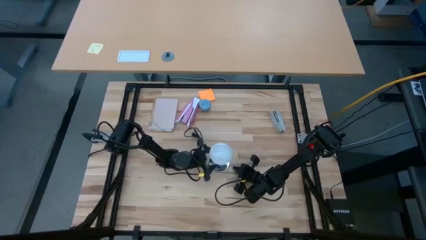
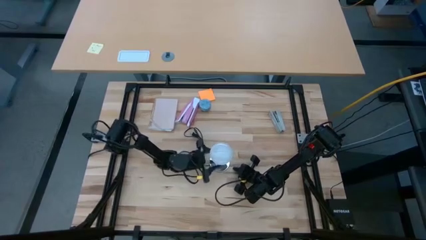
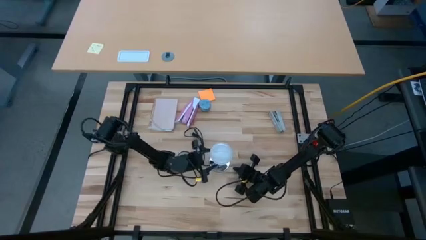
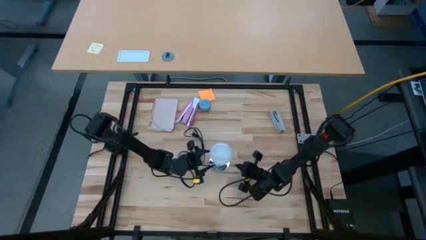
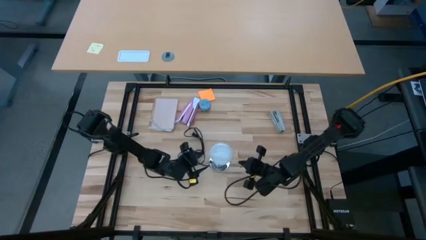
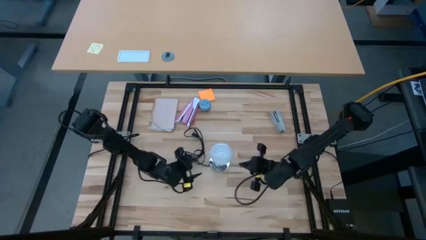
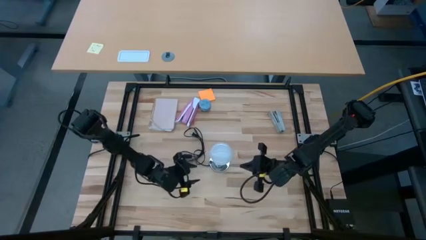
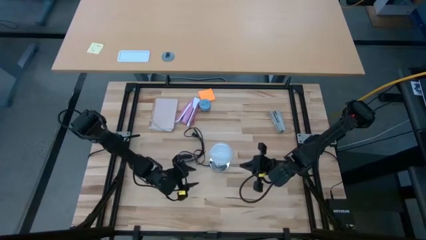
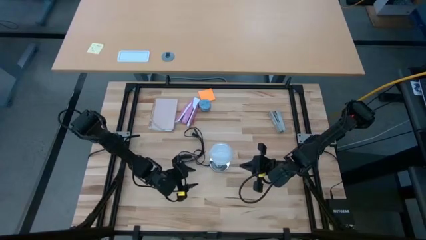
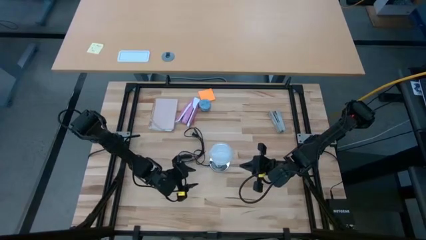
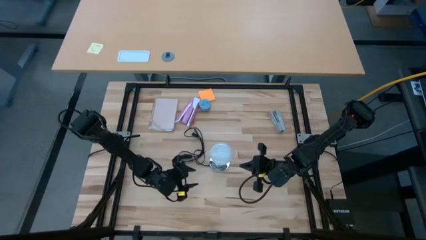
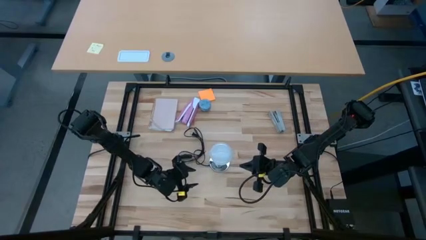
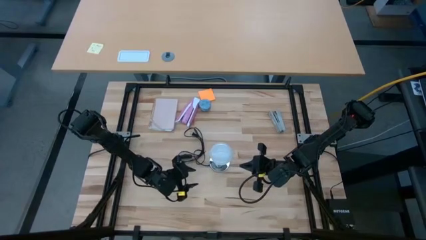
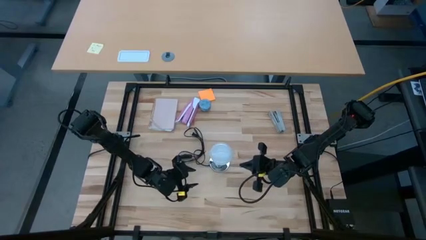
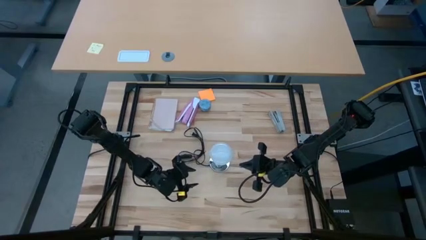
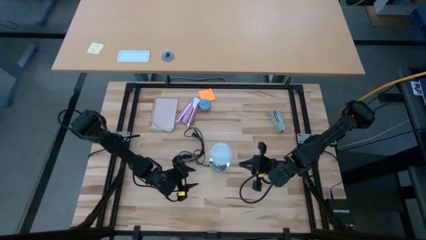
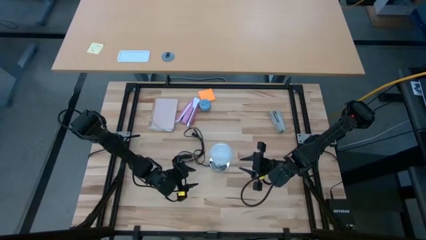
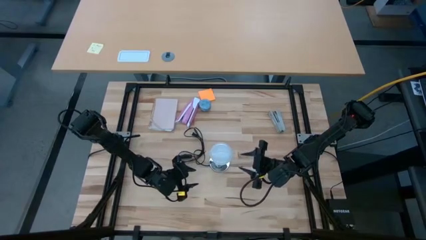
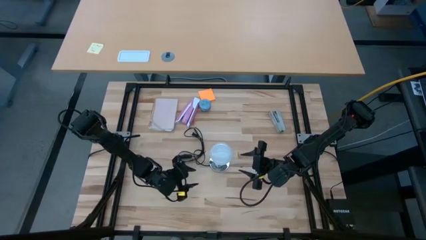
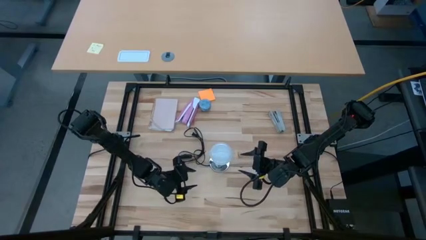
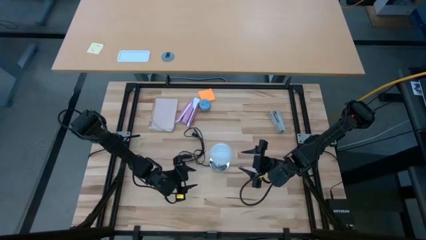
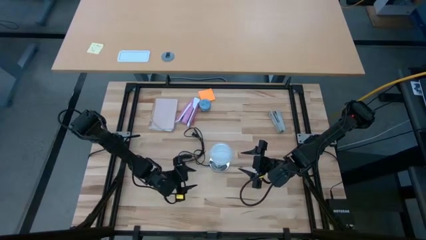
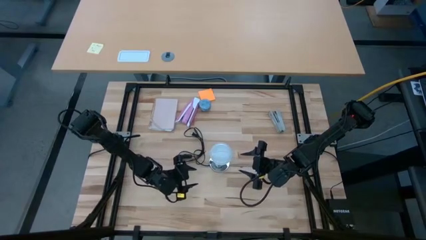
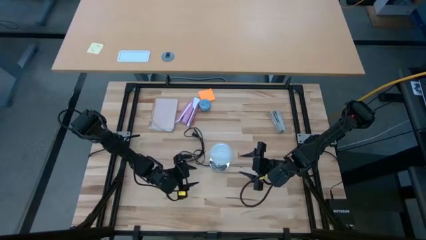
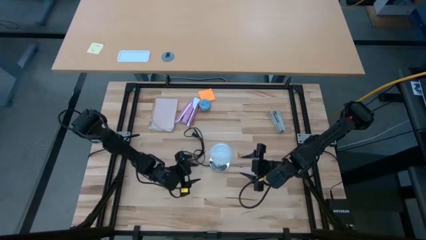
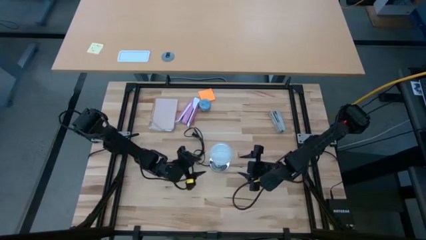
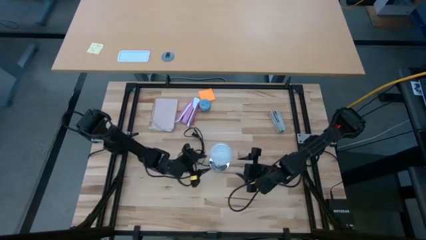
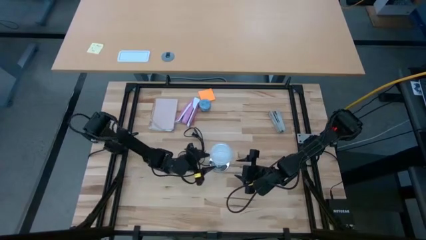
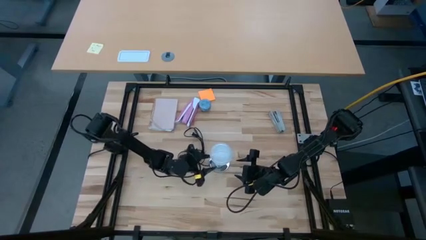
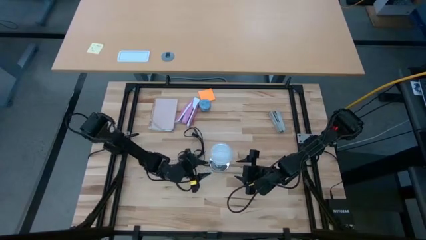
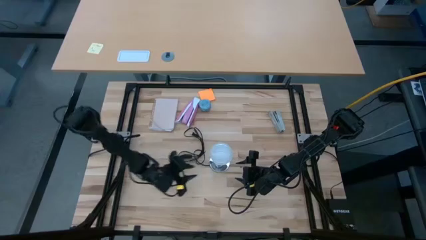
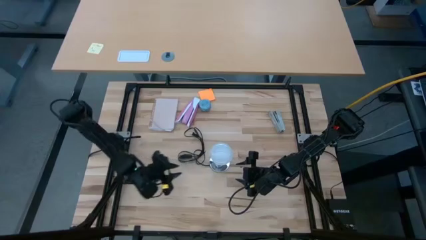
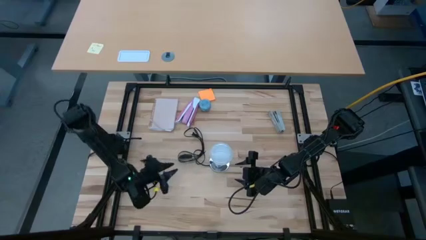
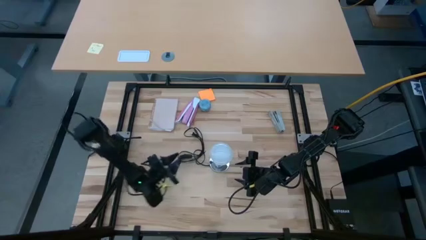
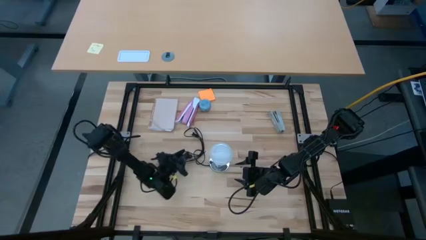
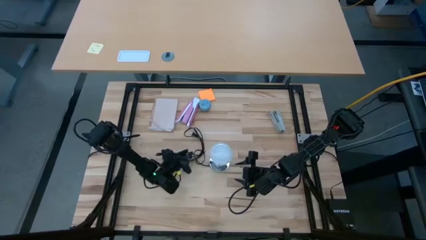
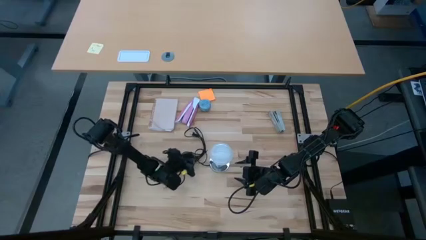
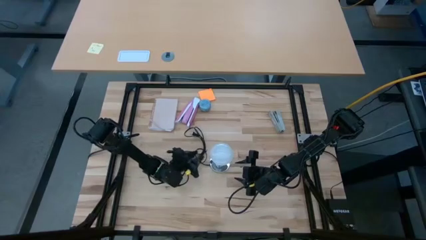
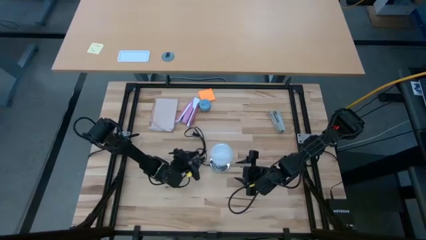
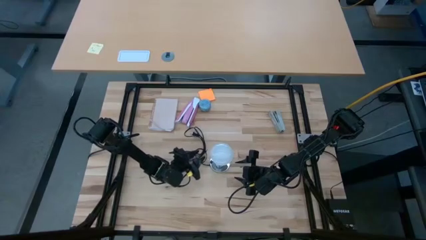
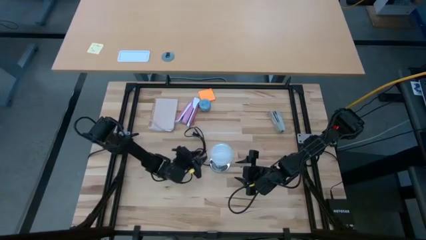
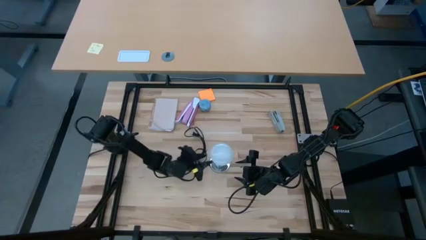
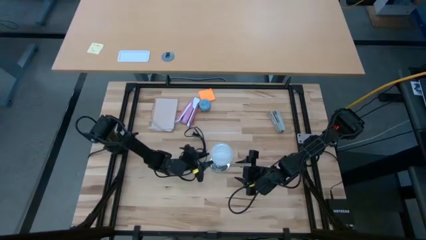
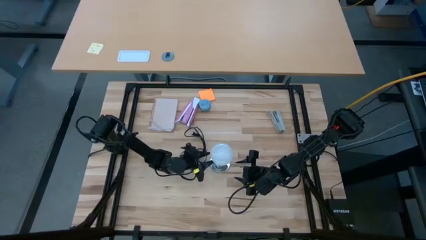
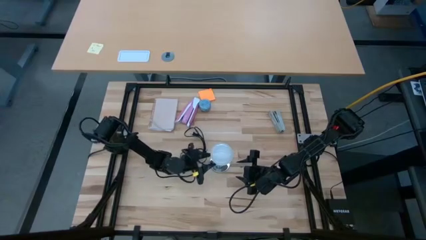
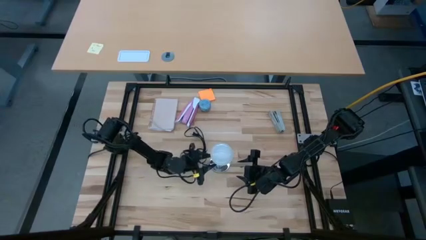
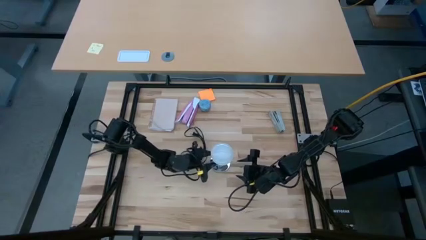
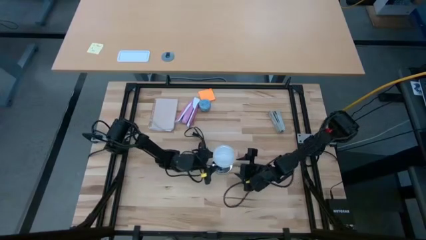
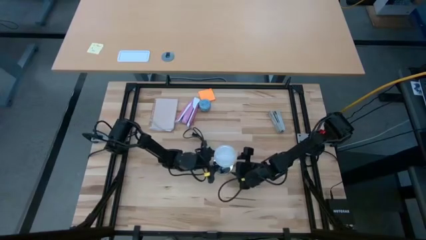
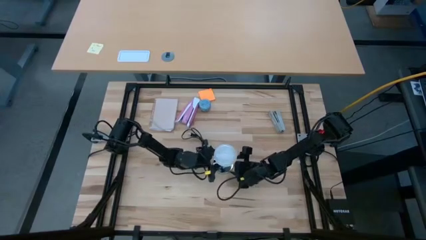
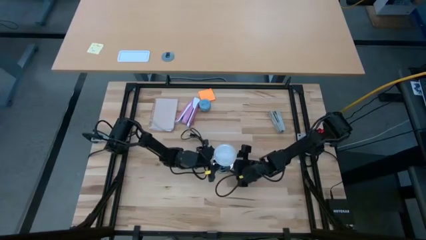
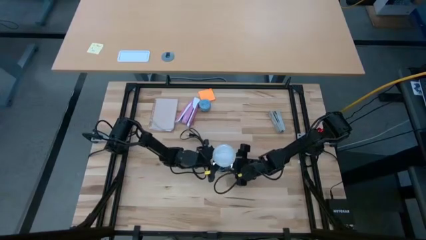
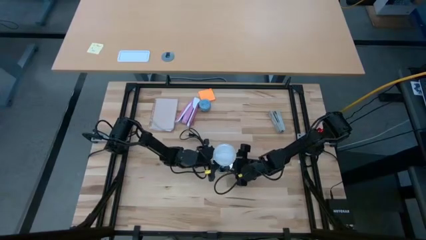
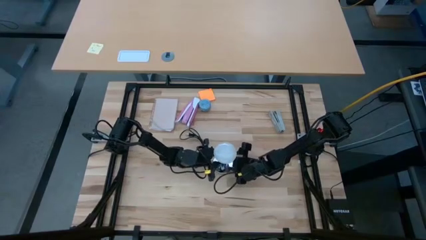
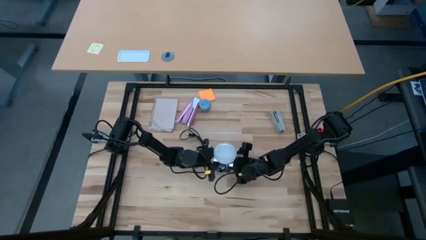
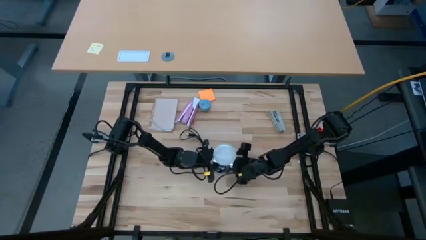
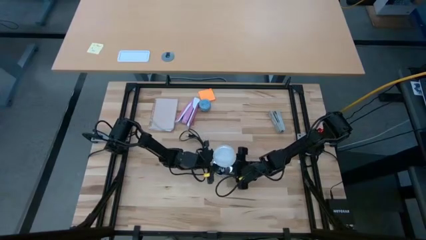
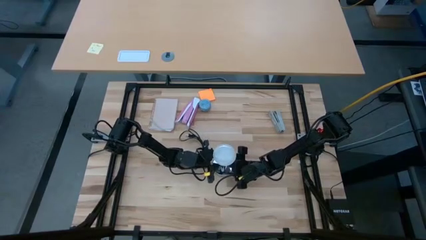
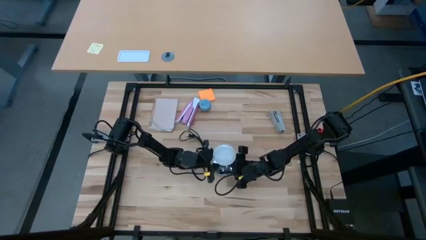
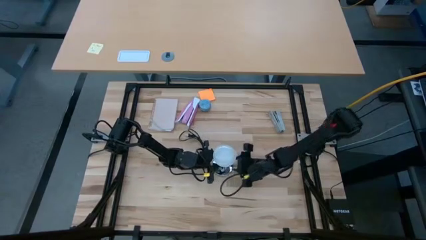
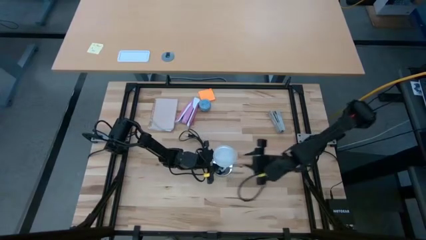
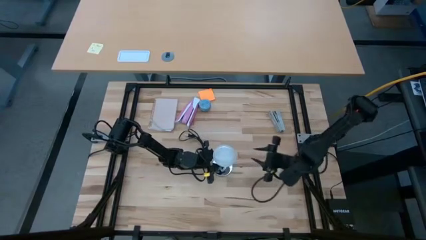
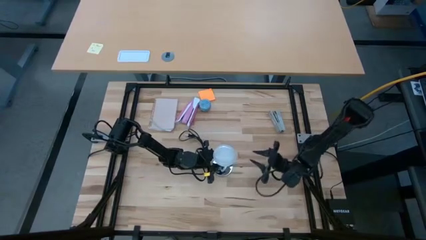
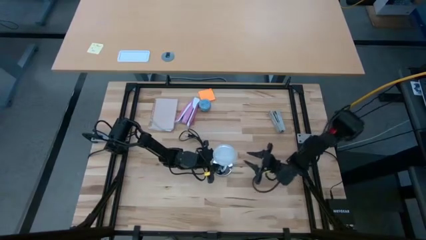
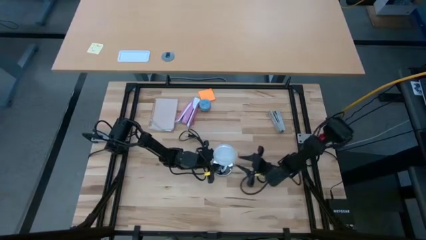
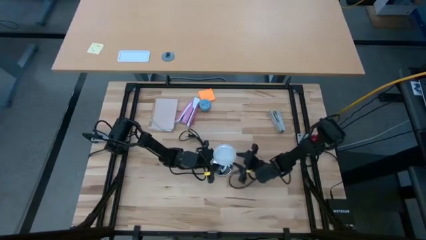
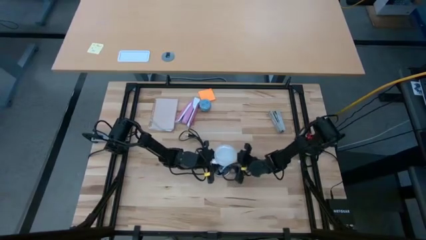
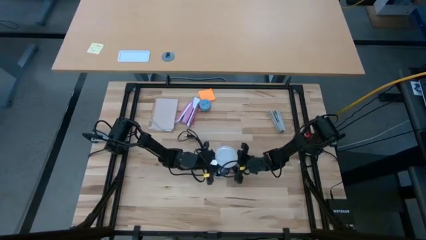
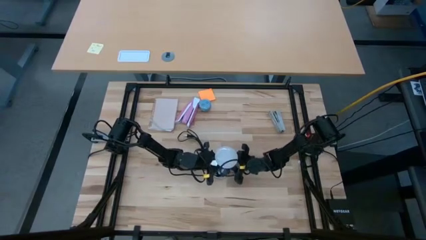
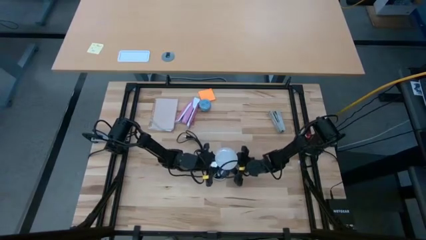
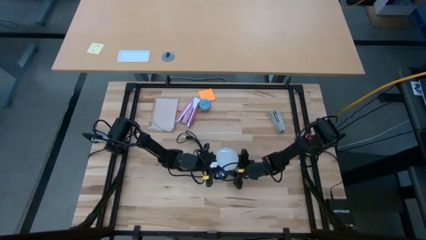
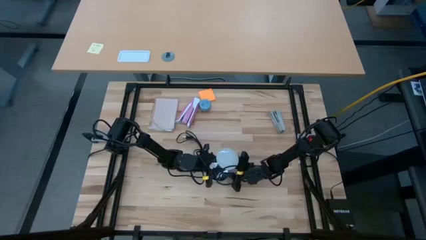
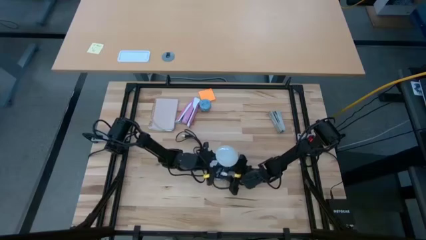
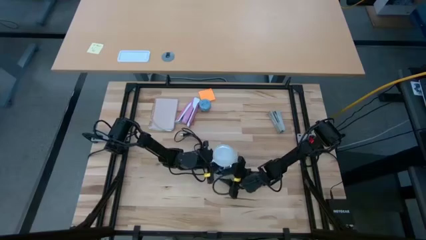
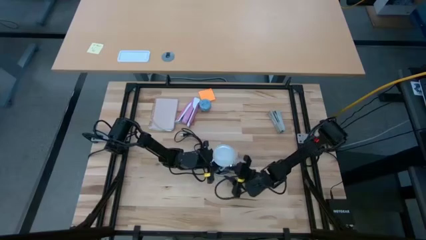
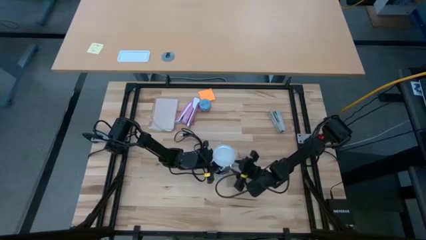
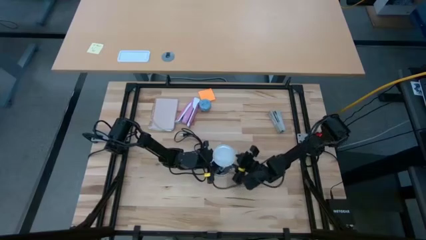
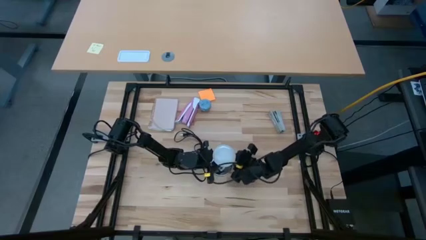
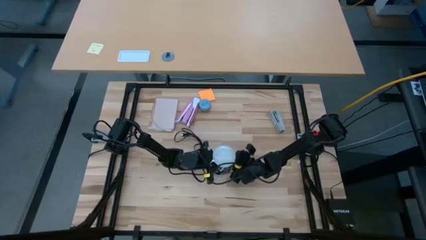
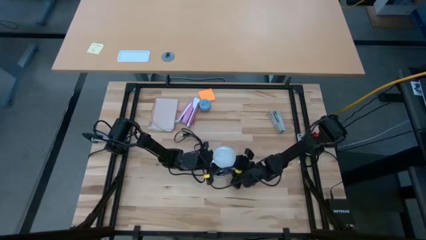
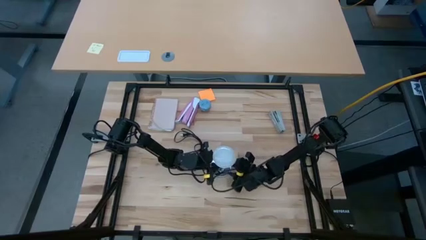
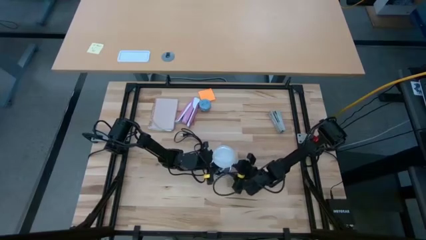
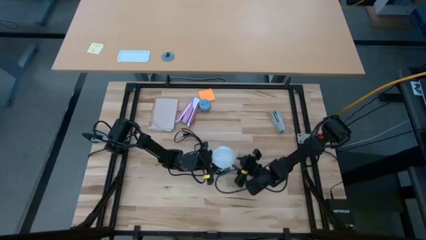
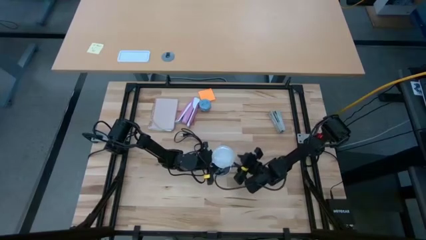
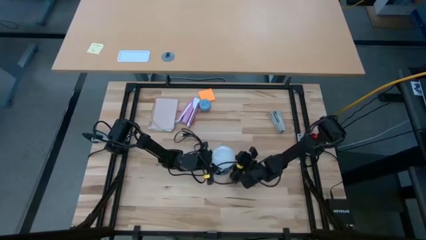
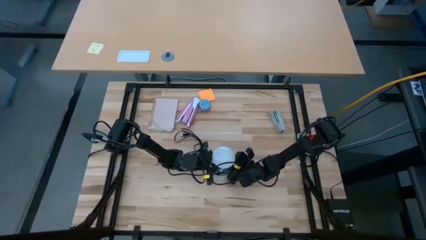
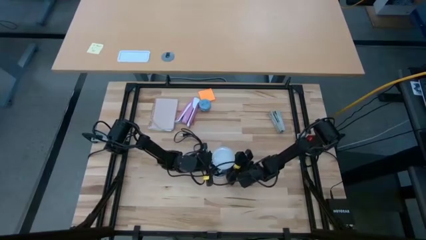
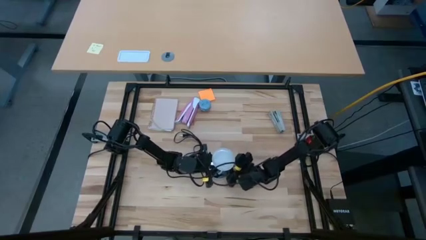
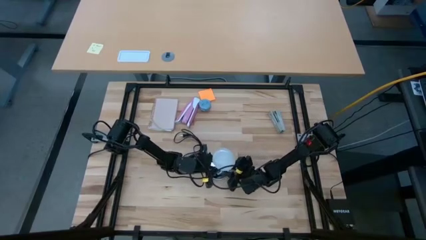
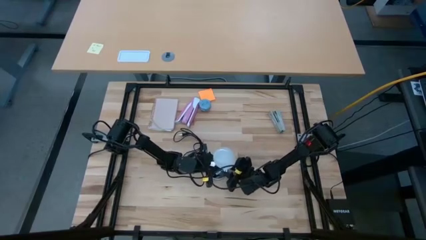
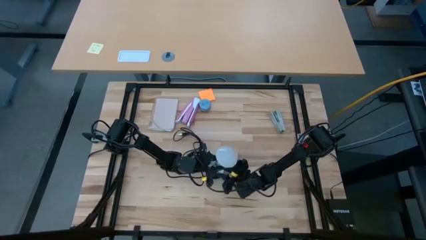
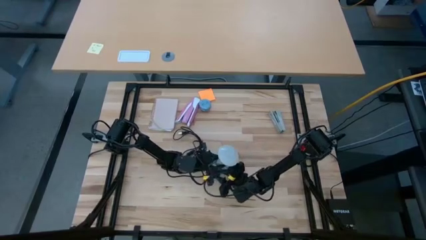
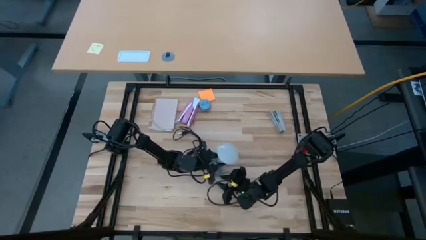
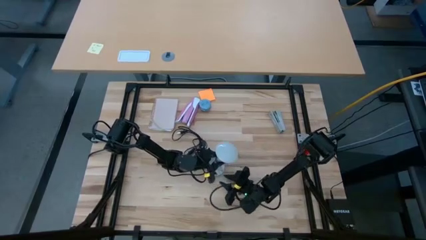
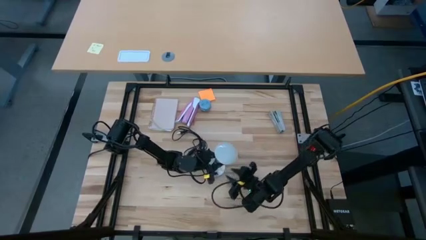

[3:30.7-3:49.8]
Task: Screw lightbulb
Remove the lightbulb from the lamp
